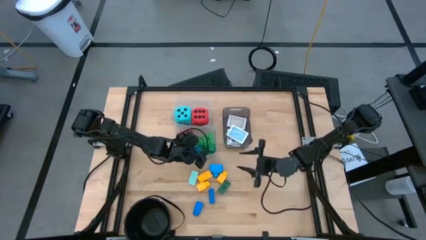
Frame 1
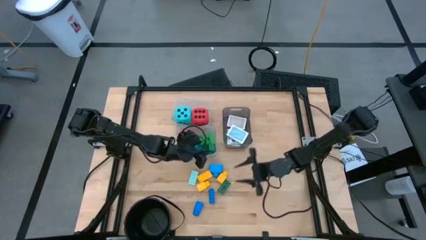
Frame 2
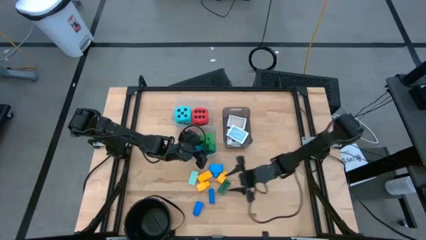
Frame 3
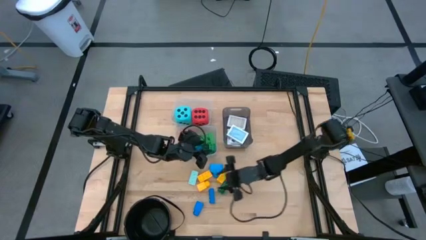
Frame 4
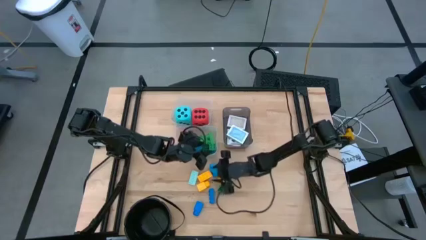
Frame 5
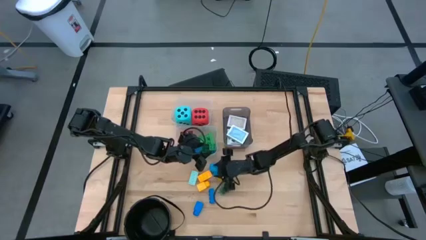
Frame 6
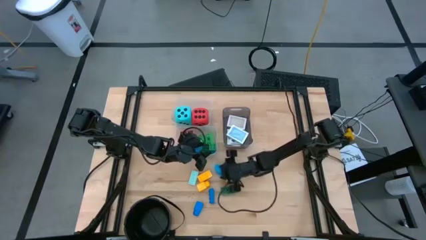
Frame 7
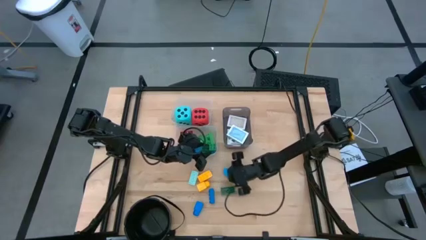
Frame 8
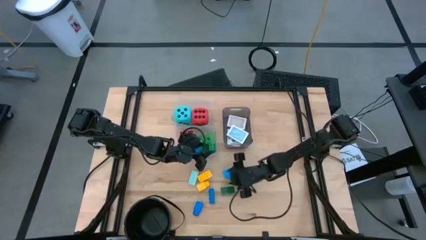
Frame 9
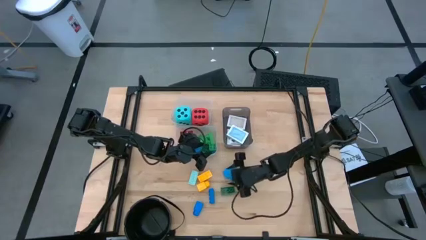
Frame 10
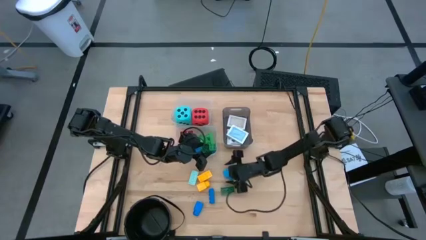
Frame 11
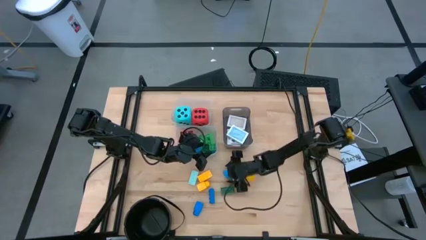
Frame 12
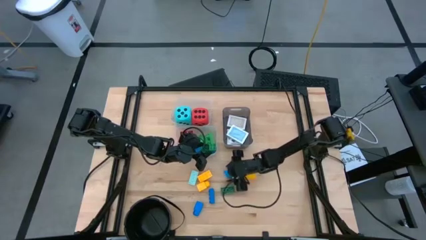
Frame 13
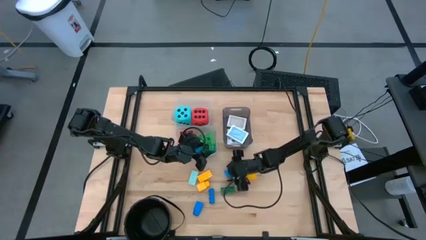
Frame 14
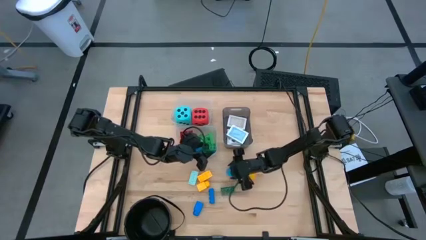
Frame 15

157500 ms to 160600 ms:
Task: Pick & Place Toys
Put the blue game piece into the bottom transparent bin

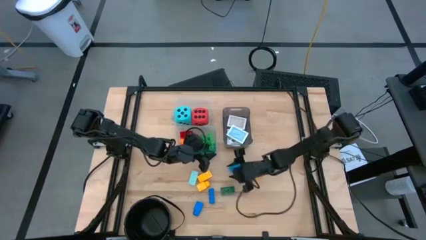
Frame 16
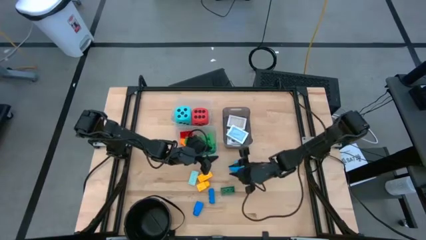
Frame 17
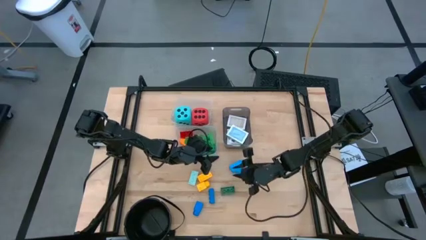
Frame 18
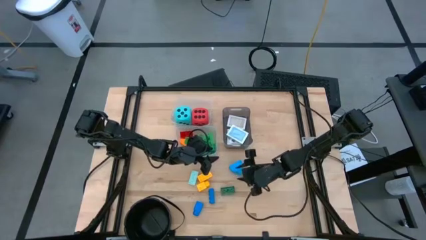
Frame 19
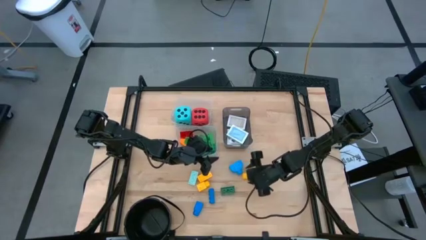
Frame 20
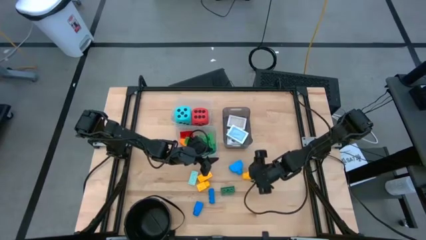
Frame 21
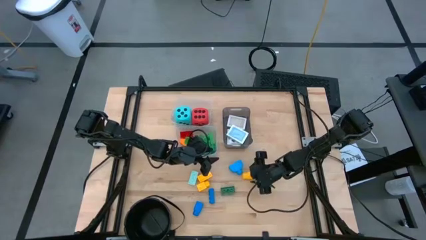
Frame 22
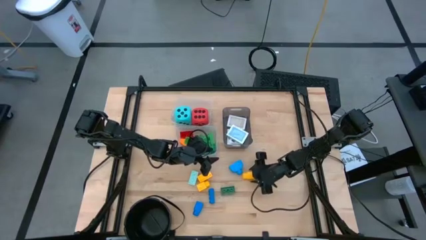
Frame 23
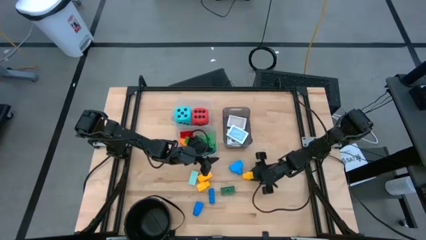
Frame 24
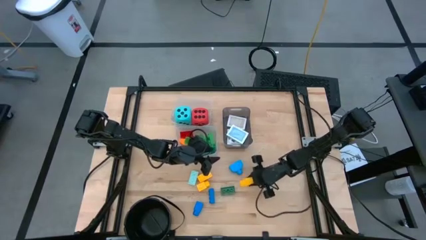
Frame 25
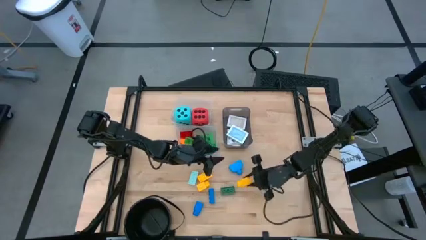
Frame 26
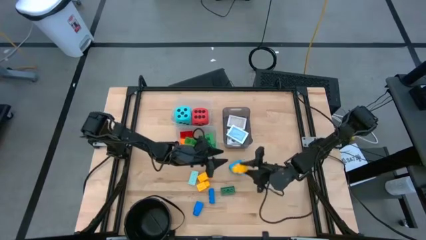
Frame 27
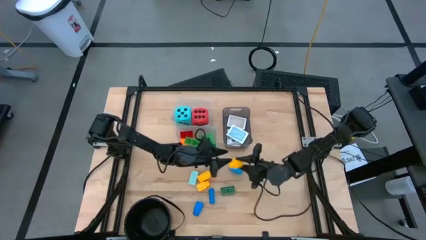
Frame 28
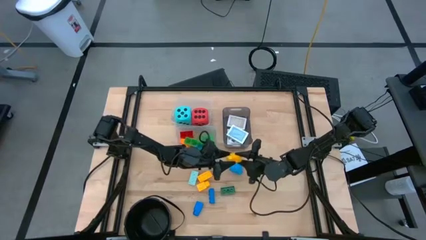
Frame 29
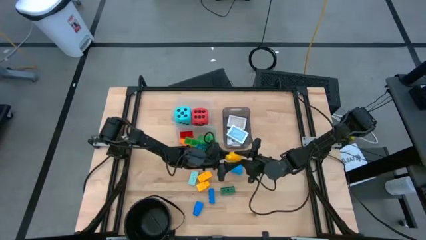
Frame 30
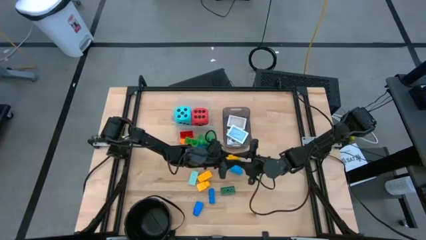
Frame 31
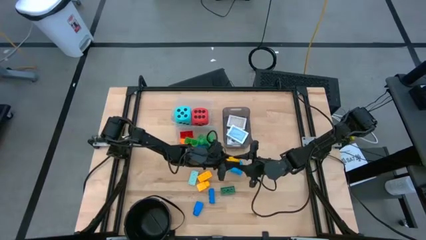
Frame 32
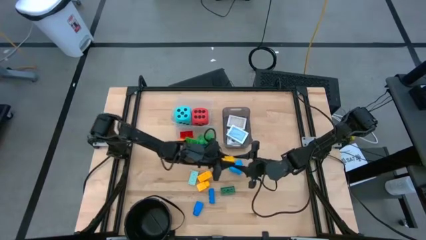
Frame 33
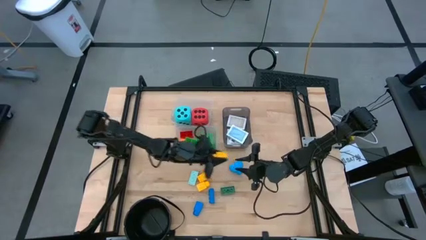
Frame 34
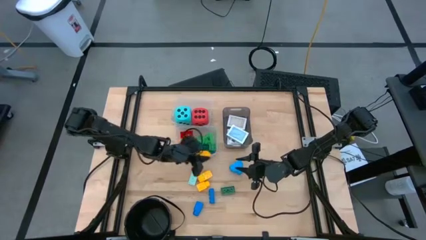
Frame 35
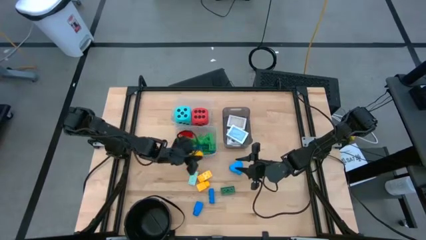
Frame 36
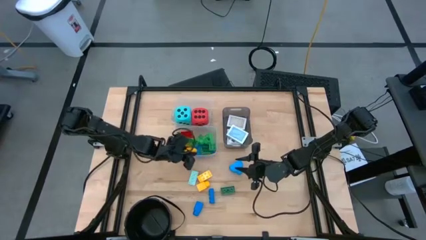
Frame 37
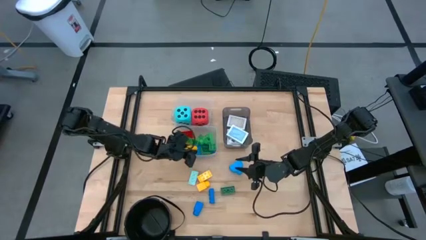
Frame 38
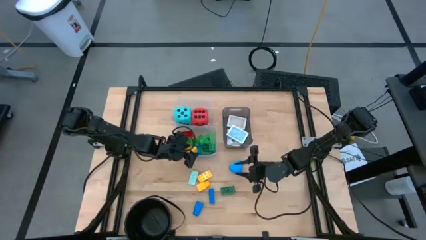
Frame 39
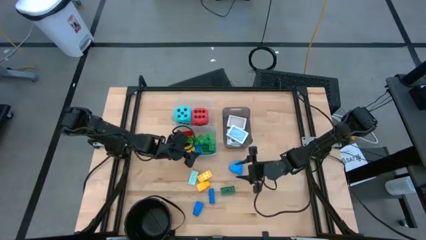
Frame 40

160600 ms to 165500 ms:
Put the yellow game piece into the bottom transparent bin

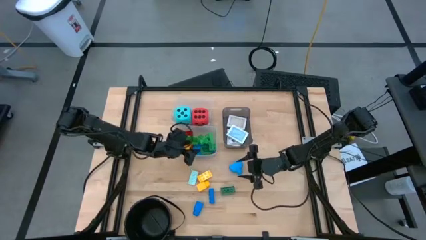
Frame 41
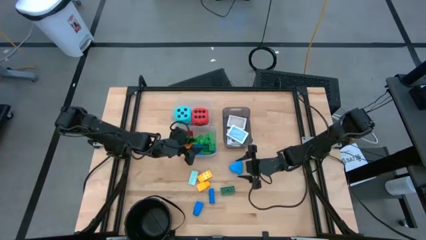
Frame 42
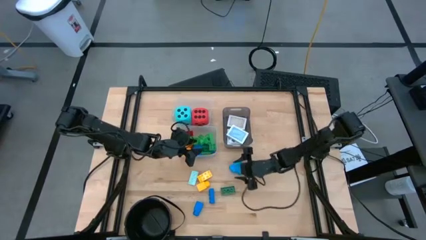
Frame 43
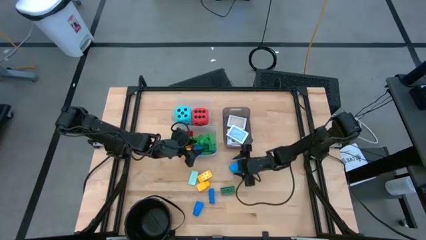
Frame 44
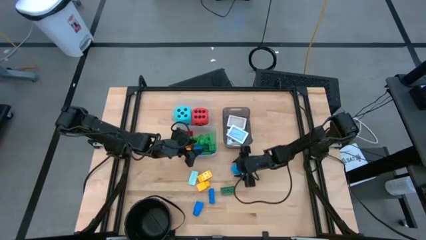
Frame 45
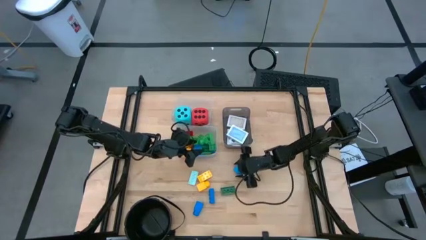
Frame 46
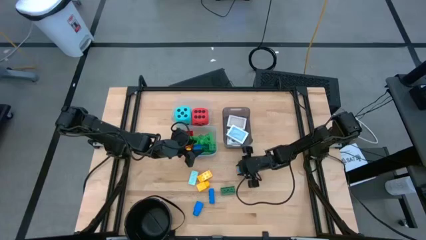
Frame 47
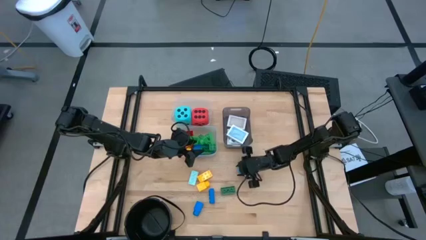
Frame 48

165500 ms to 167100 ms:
Put the blue game piece into the bottom transparent bin

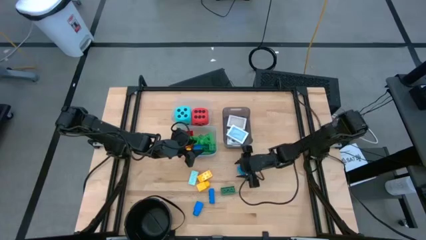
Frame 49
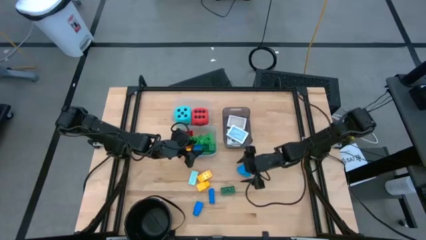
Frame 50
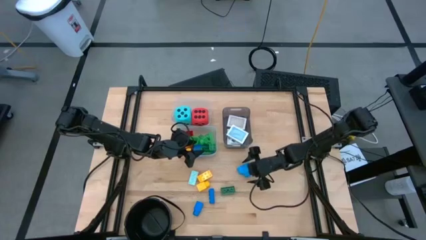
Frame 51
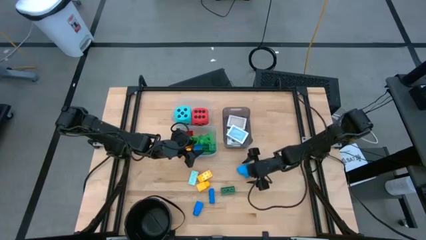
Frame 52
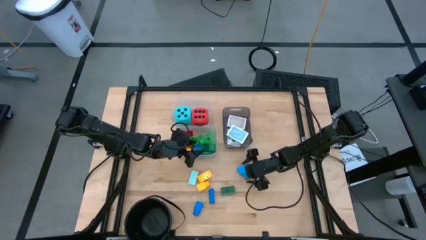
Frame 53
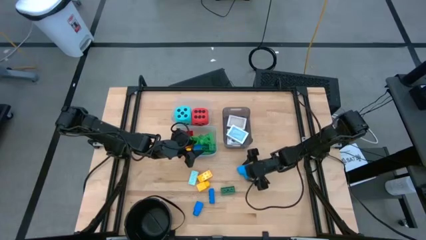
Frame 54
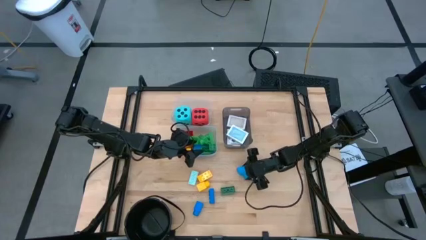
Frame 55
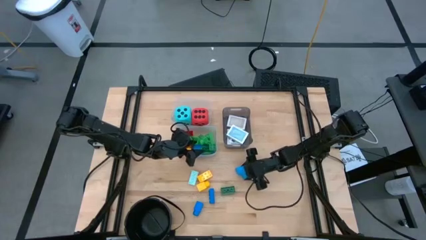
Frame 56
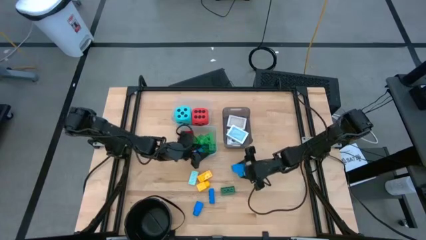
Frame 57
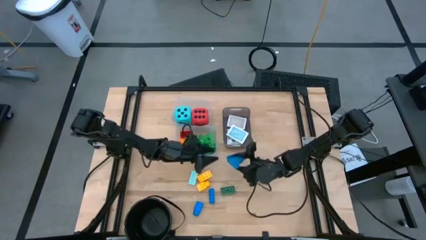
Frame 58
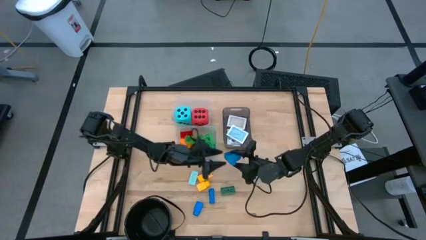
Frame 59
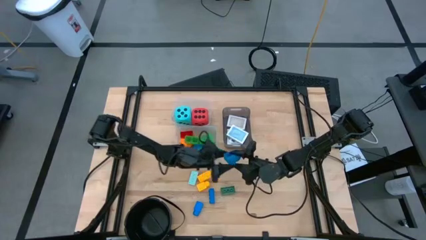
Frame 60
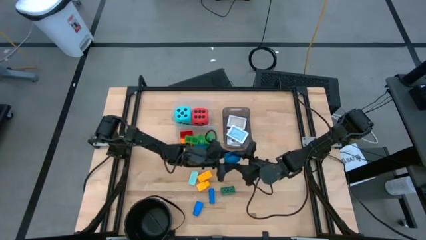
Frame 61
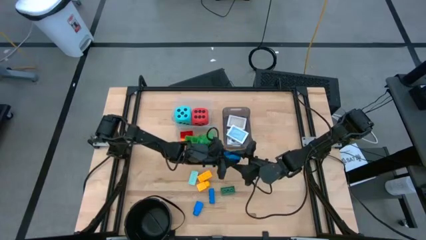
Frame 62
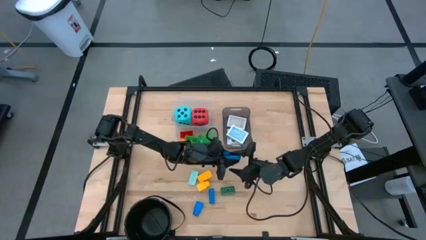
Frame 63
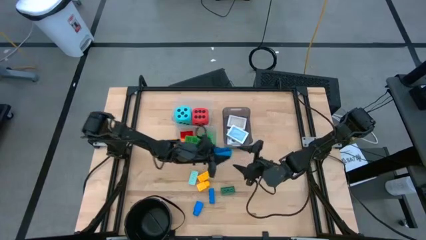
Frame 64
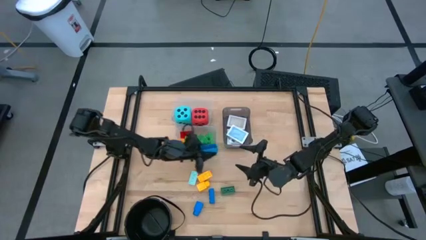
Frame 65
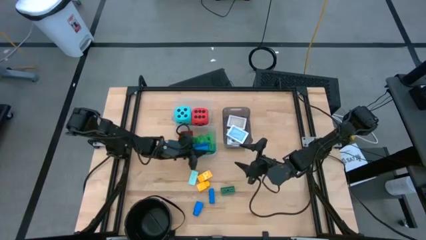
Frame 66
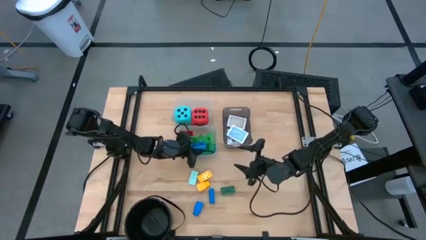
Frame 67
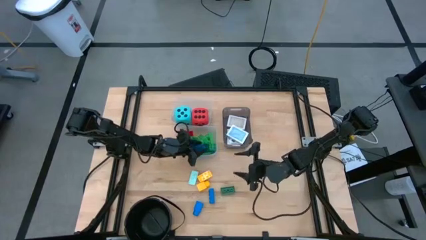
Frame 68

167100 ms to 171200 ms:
Put the blue game piece into the bottom transparent bin

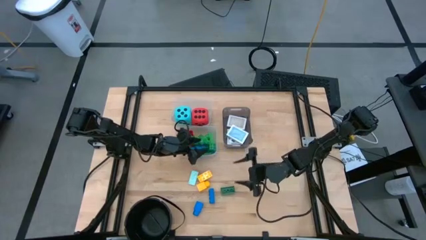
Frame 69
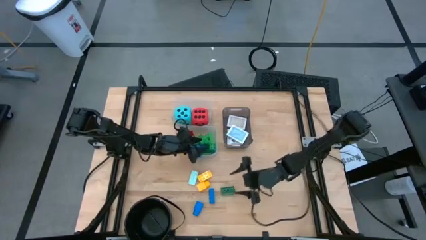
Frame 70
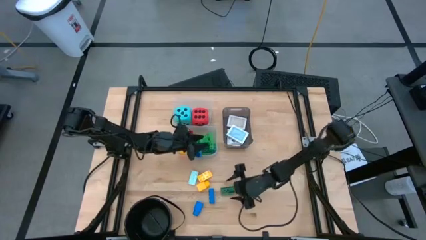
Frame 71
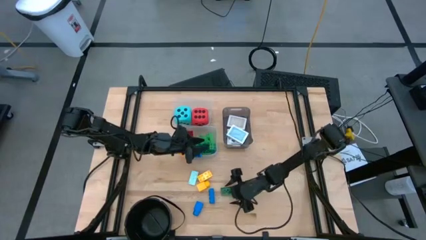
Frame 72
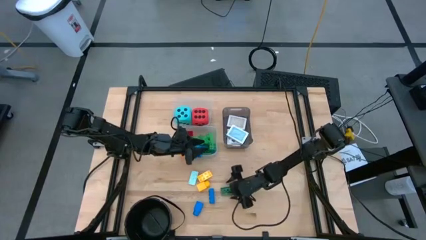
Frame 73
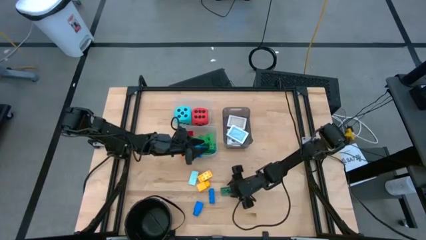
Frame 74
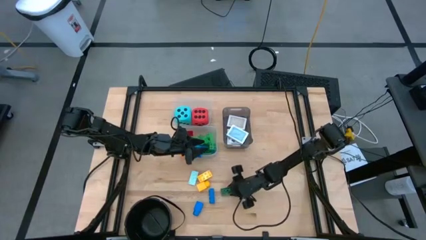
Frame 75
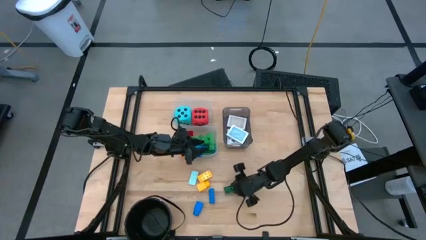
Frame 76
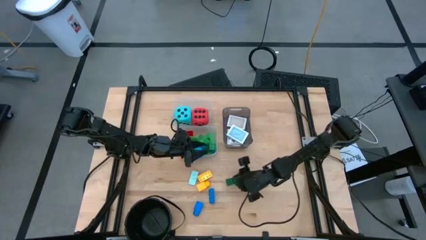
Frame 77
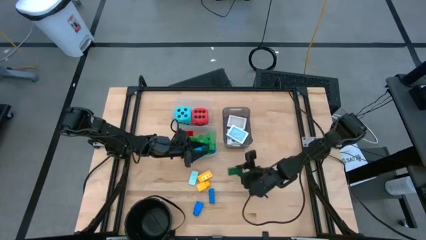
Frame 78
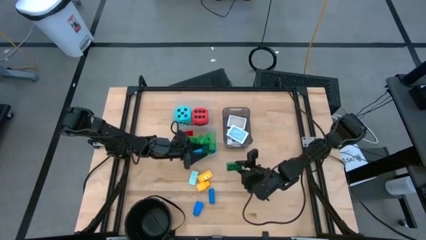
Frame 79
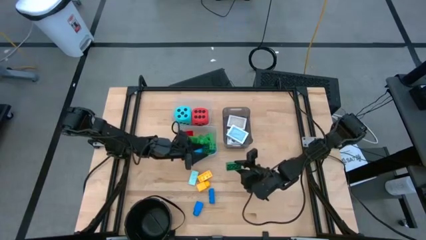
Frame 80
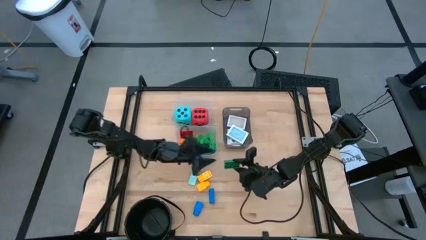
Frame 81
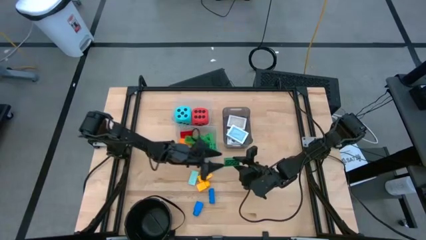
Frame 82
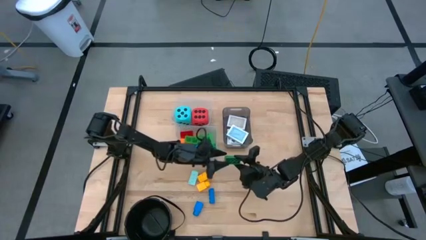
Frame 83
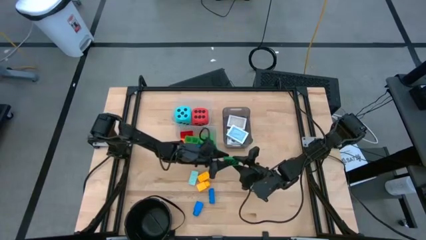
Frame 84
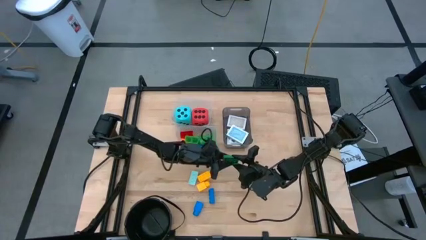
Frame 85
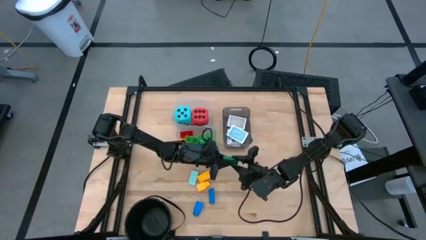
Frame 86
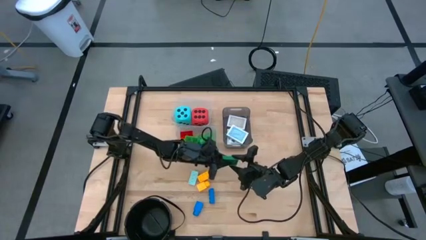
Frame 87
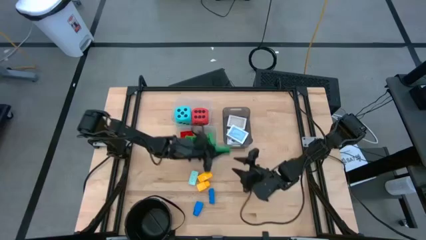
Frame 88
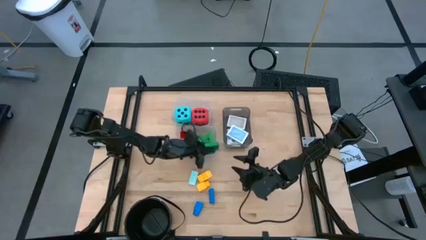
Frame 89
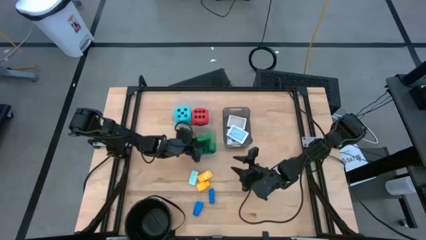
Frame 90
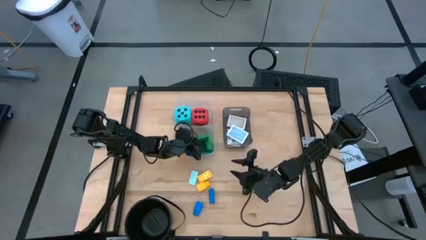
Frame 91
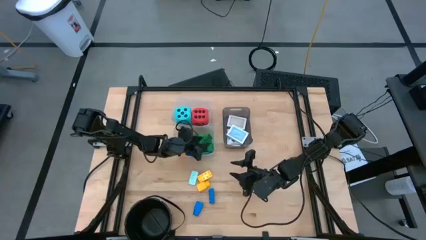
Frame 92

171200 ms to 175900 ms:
Put the green game piece into the bottom transparent bin
